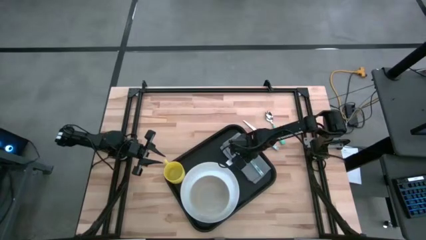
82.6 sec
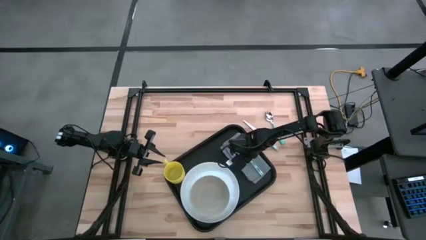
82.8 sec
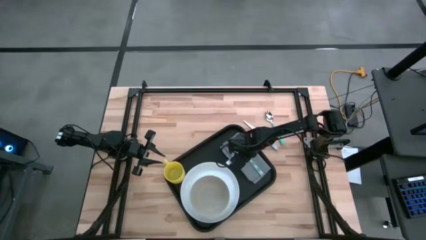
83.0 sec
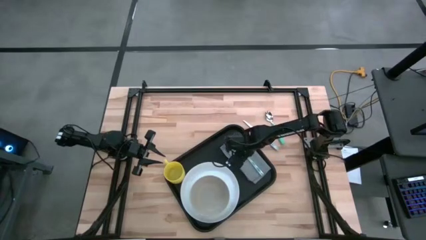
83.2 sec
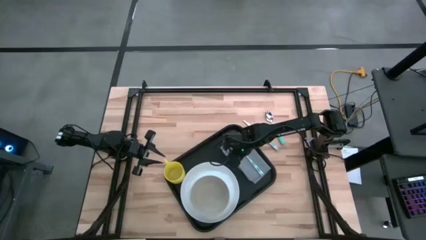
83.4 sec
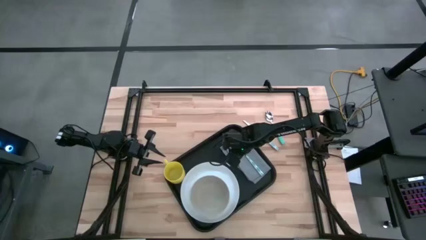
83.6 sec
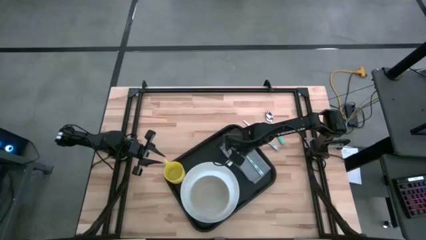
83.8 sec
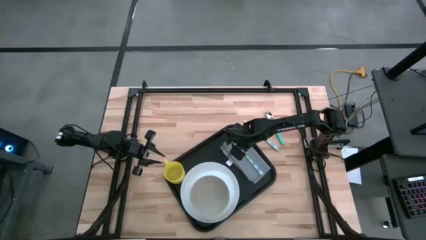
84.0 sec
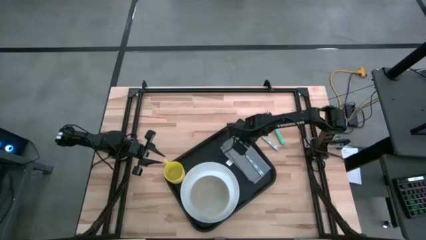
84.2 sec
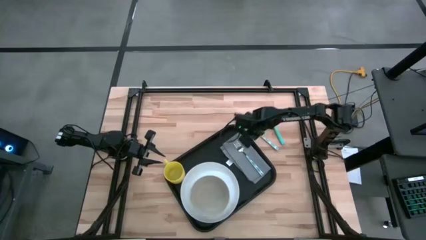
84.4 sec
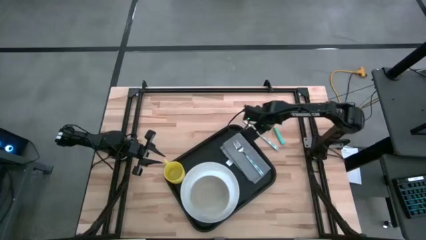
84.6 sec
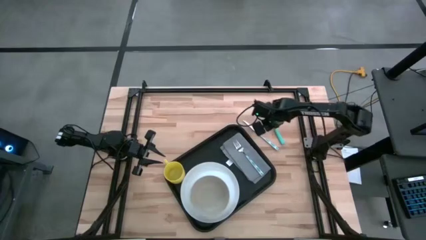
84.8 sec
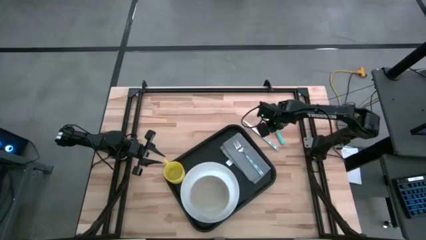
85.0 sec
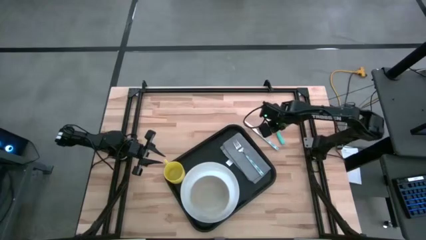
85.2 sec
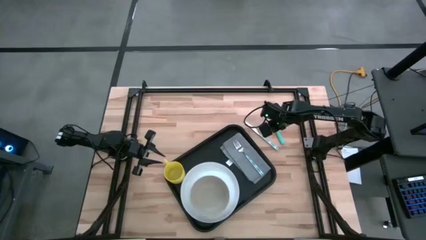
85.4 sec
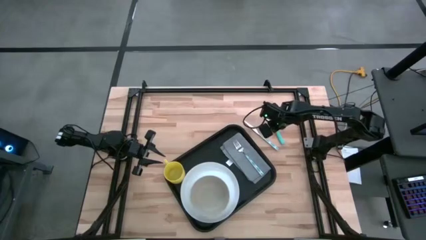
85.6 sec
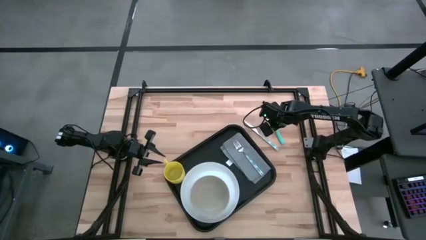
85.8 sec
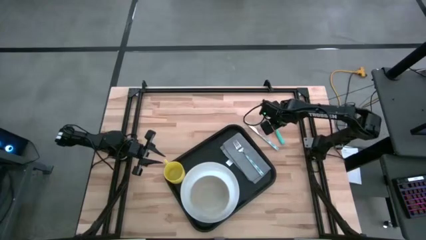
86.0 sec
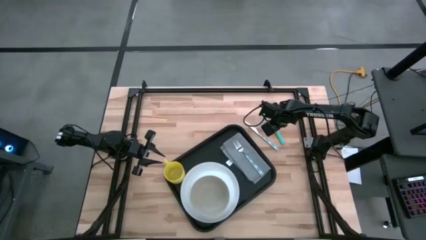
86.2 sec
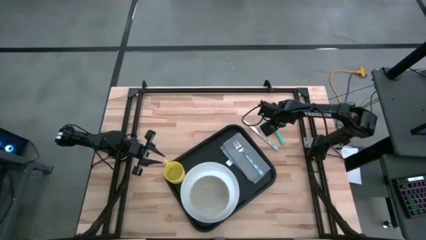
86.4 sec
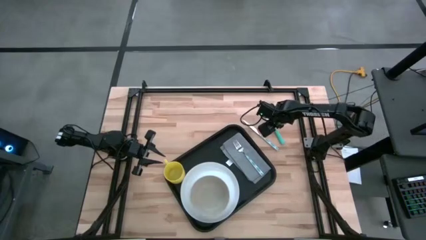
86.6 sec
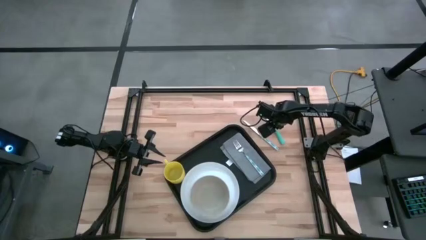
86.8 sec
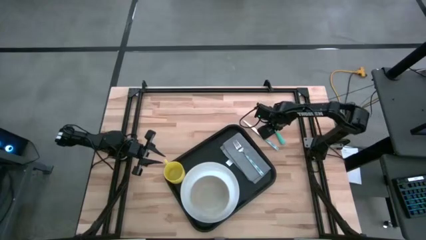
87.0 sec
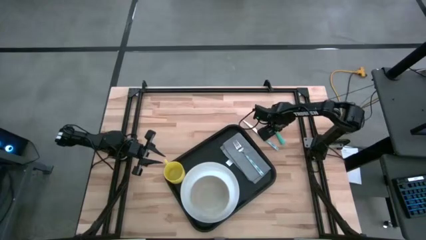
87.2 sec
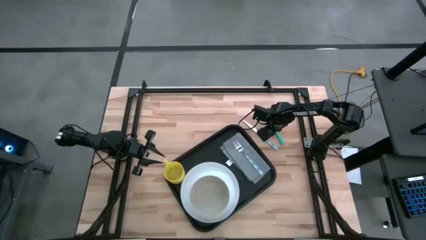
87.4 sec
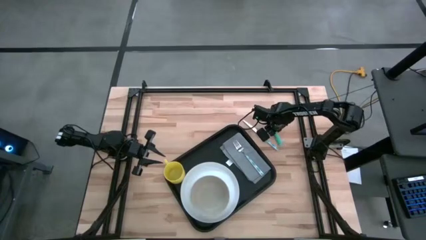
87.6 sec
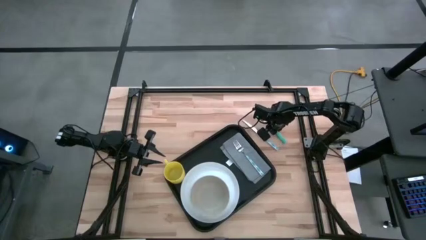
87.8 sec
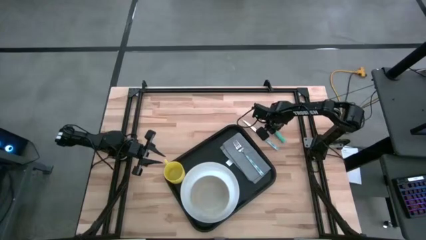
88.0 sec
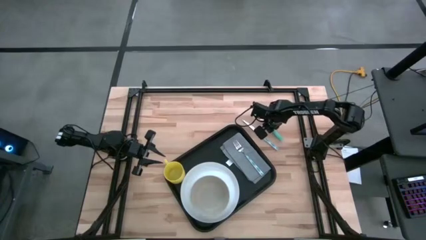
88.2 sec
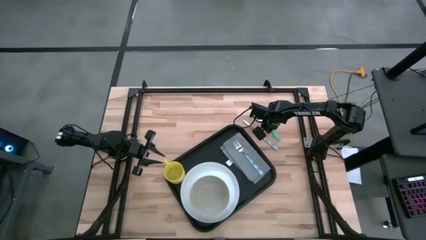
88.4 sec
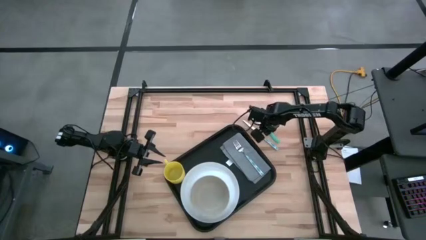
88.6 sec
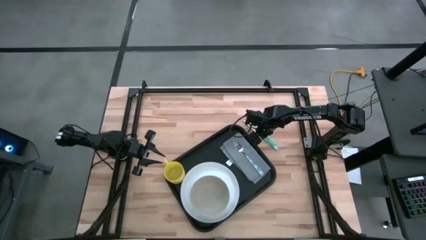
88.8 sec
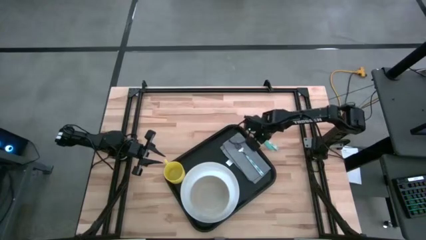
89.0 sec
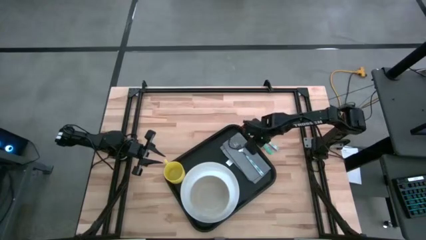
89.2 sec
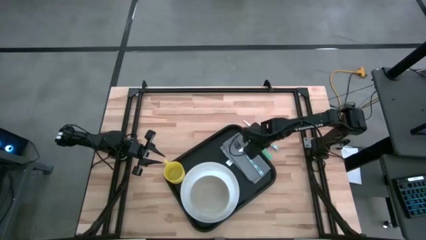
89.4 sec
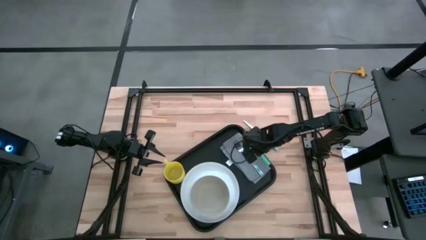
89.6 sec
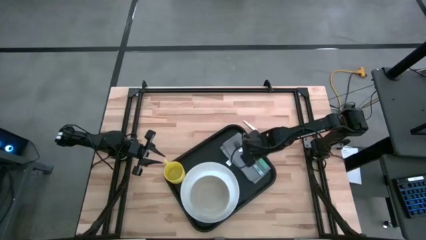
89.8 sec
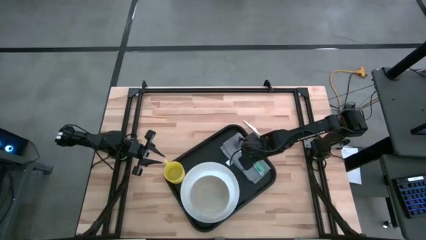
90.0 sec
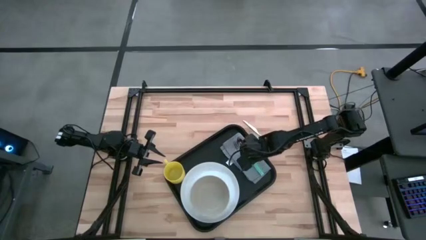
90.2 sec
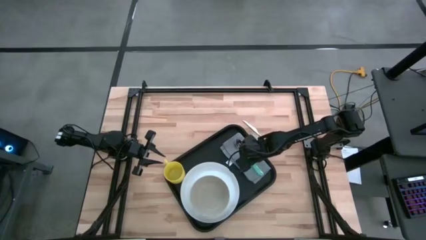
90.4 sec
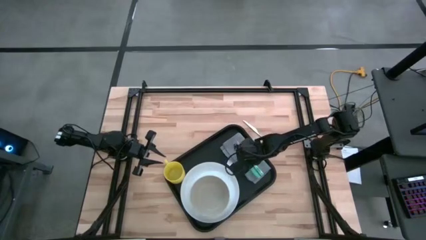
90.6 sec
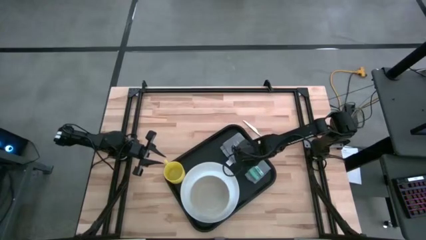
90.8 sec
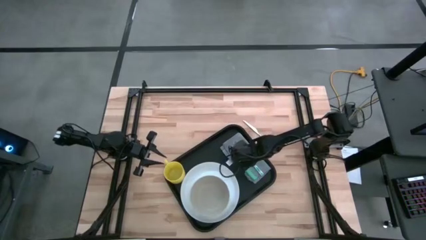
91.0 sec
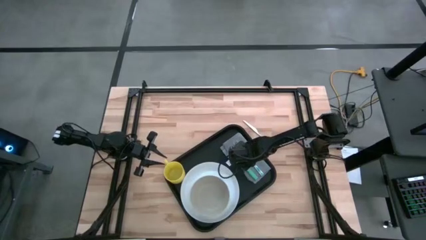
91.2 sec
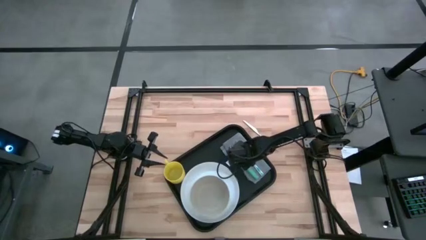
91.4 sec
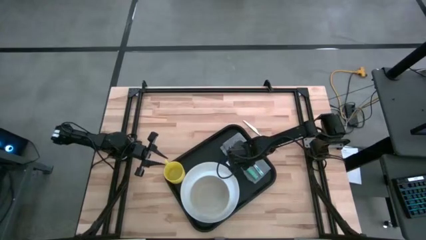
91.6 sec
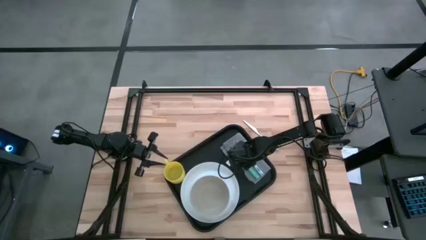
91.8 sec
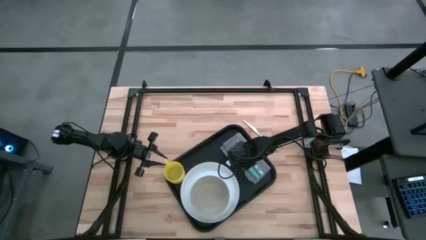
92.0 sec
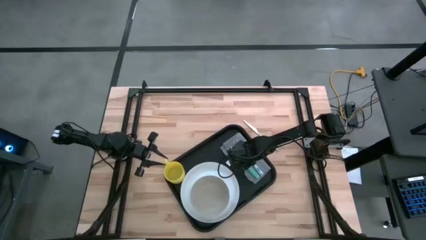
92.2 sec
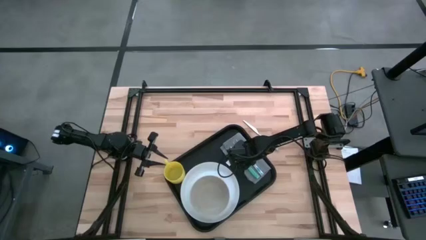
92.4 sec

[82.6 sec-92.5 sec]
Task: Set up tray
Put the light blue spoon on the gray napkin
